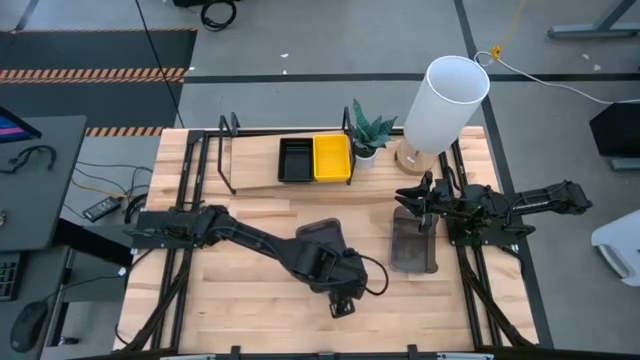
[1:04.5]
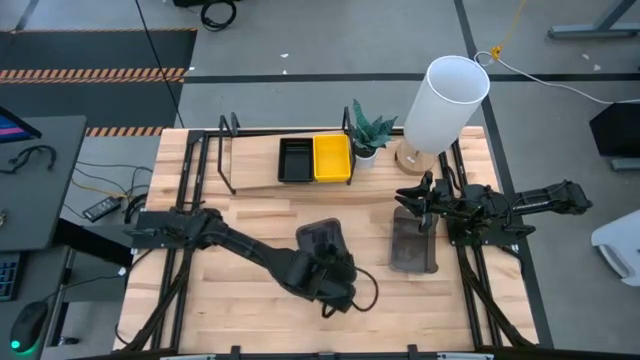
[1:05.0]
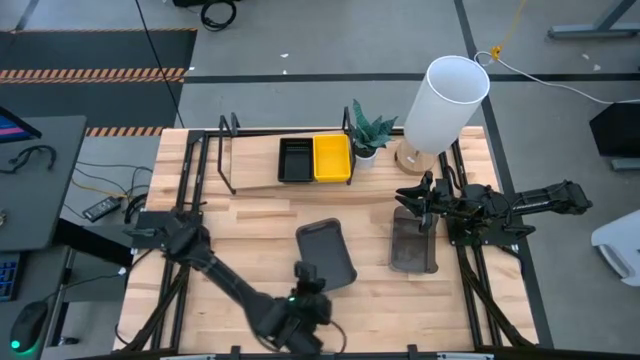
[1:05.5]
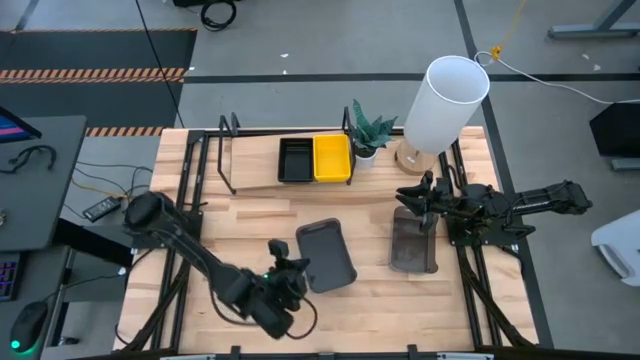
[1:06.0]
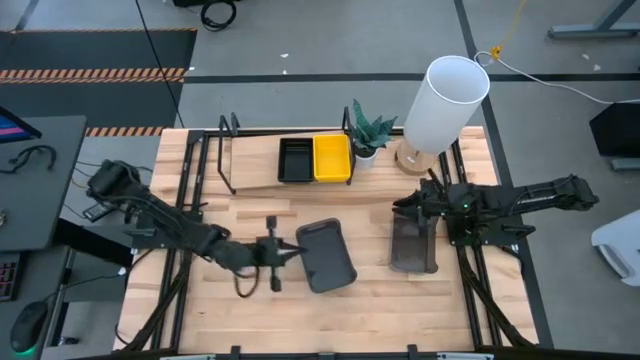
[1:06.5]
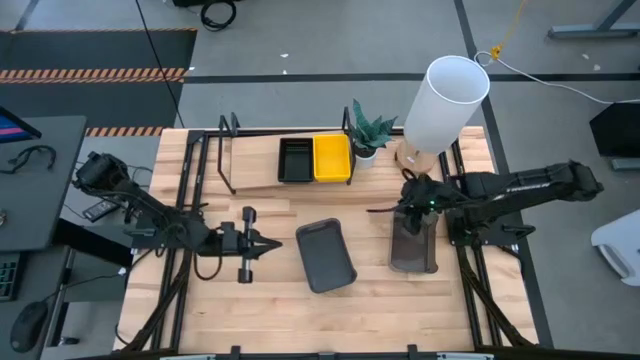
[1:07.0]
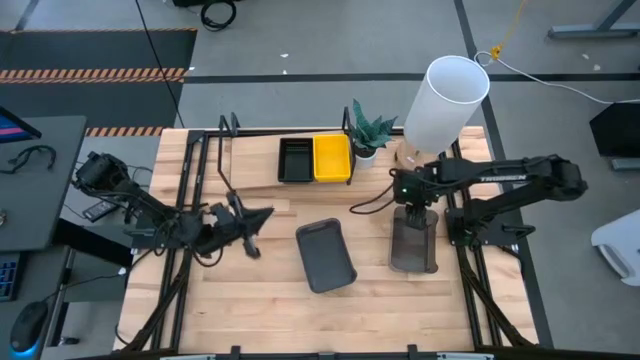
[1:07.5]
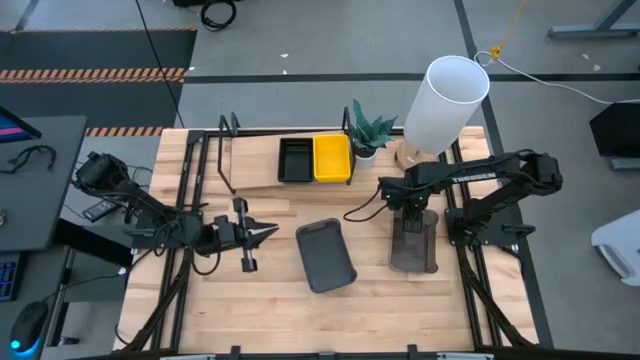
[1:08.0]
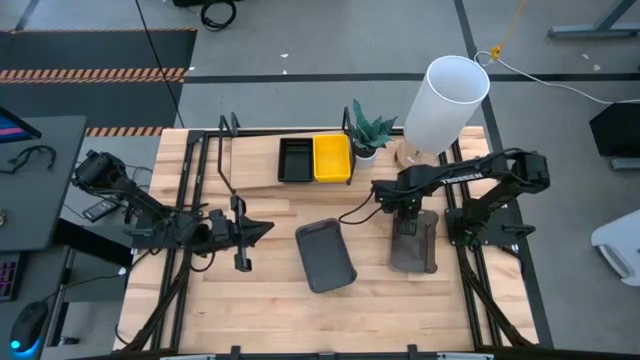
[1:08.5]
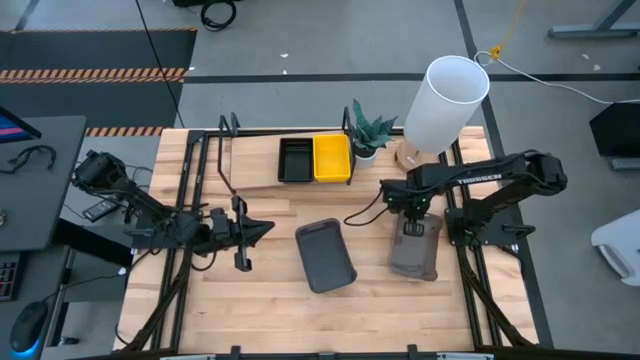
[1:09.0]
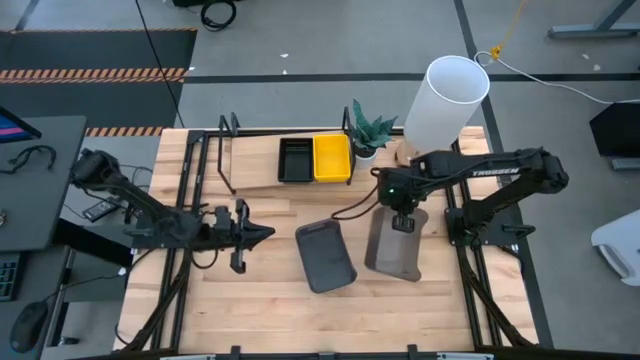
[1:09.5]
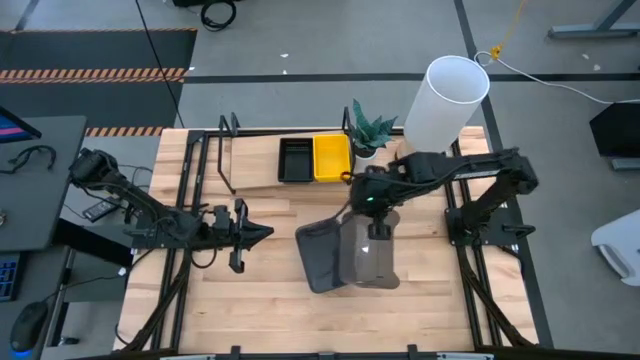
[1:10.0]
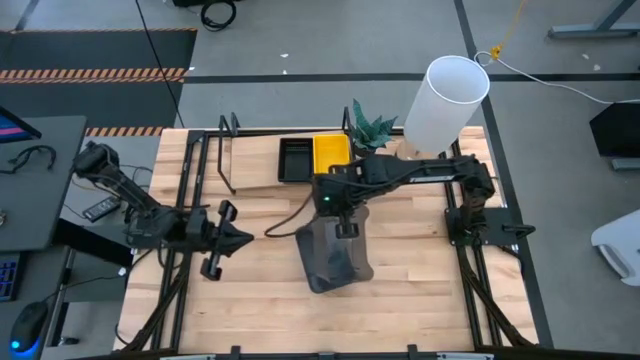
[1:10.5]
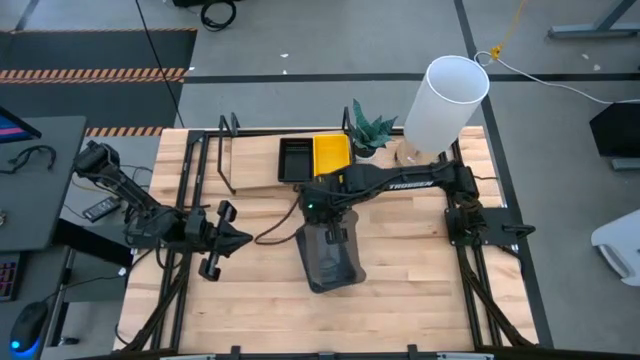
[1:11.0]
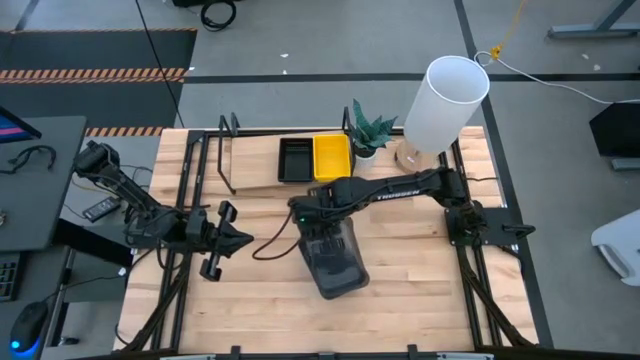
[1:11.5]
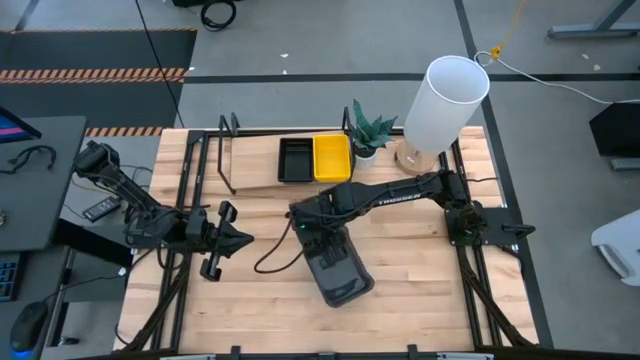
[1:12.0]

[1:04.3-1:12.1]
Task: Stack baskets on shelf by color
Stack the right black bin on top of the left black bin

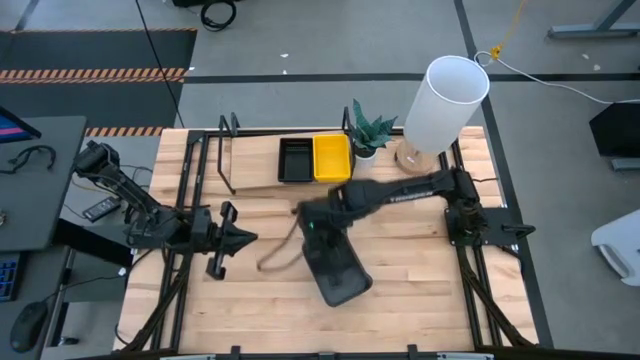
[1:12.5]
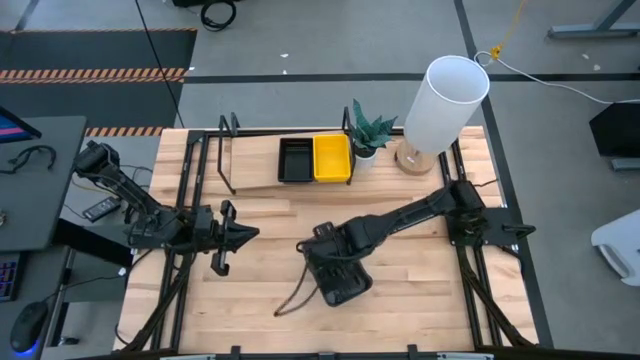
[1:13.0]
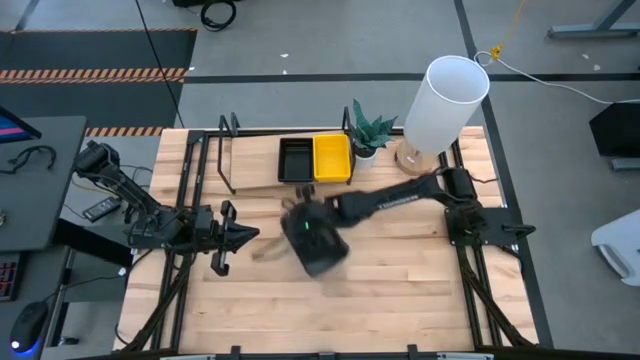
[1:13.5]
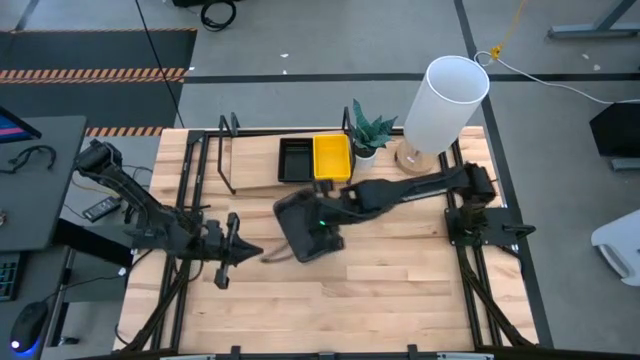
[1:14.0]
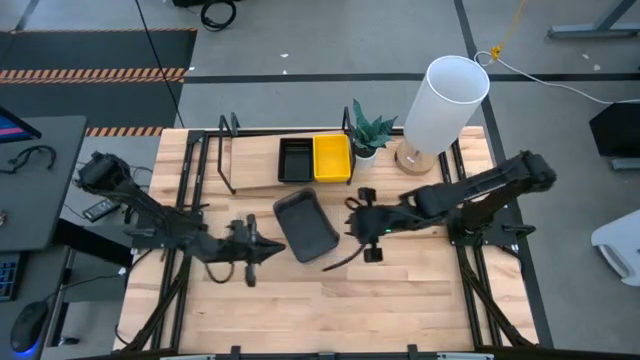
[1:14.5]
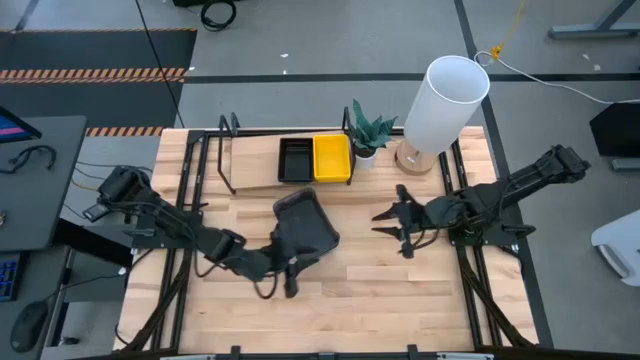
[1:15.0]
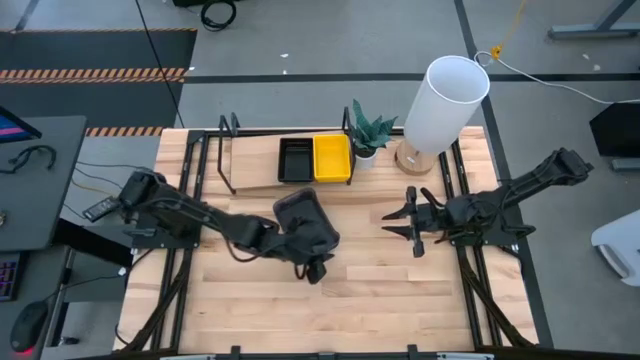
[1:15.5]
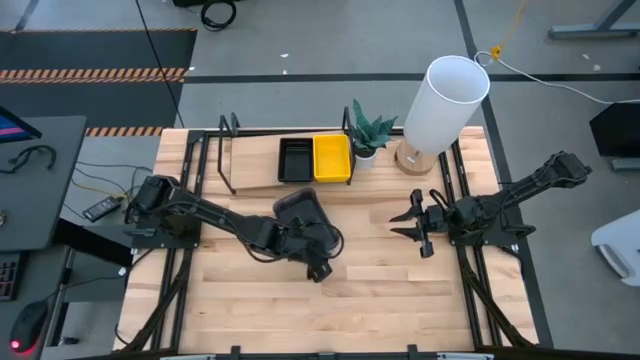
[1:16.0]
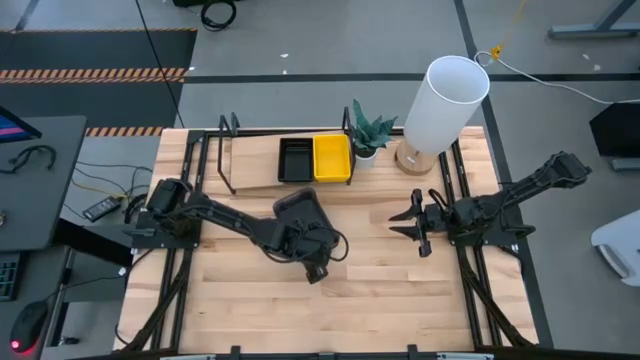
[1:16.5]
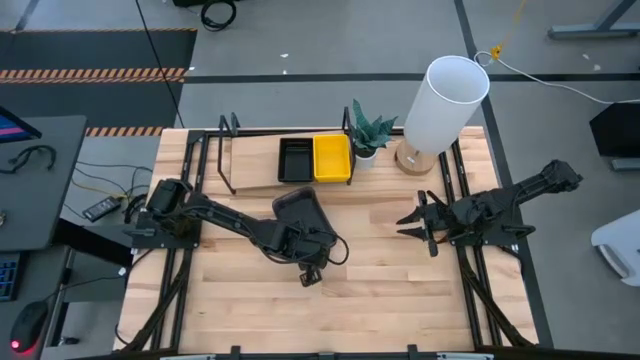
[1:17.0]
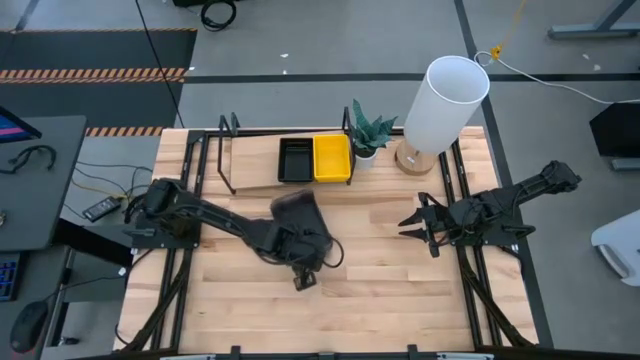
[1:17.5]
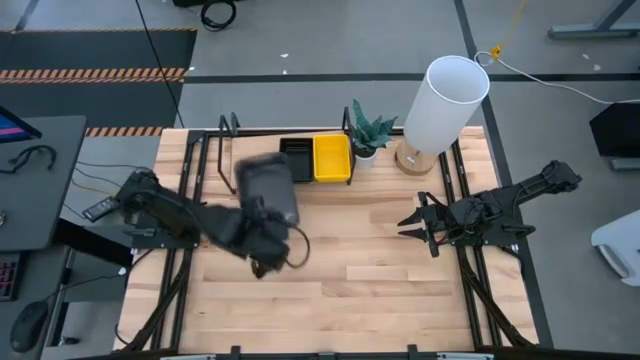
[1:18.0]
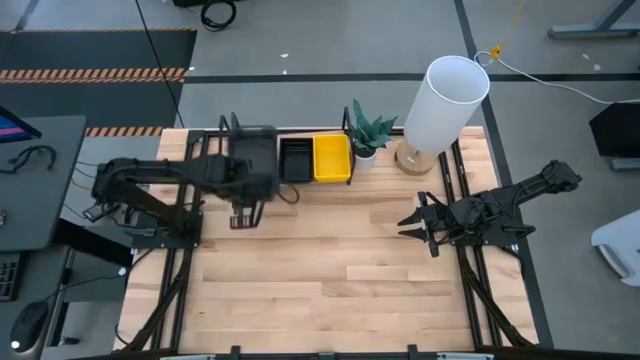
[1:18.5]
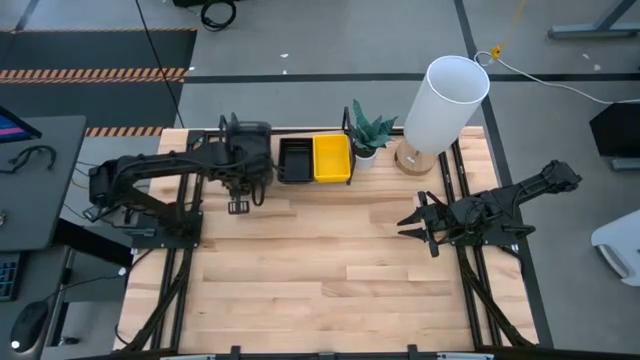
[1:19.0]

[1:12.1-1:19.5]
Put the stacked black bins on the shelf

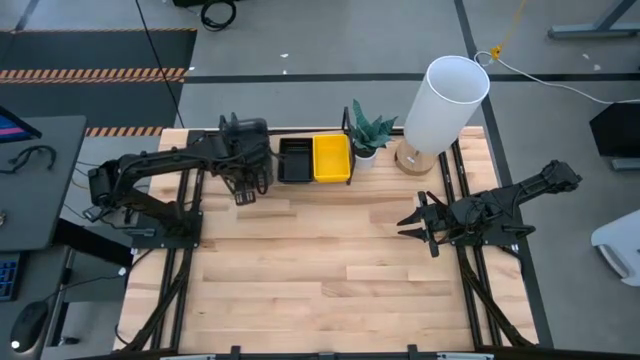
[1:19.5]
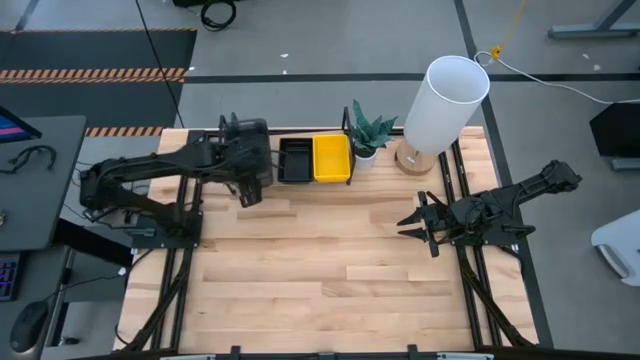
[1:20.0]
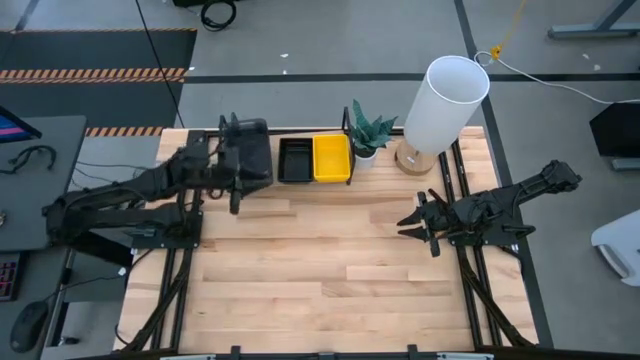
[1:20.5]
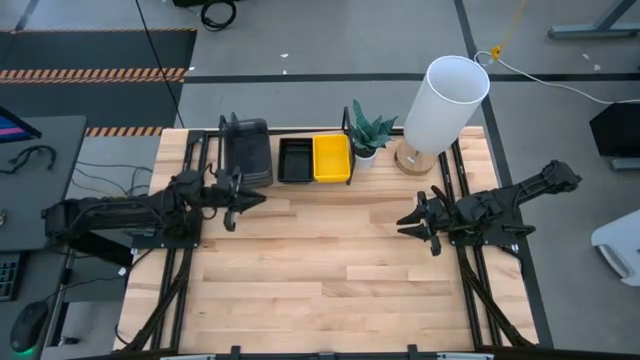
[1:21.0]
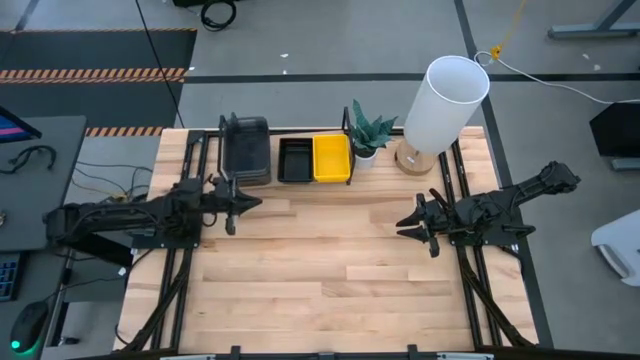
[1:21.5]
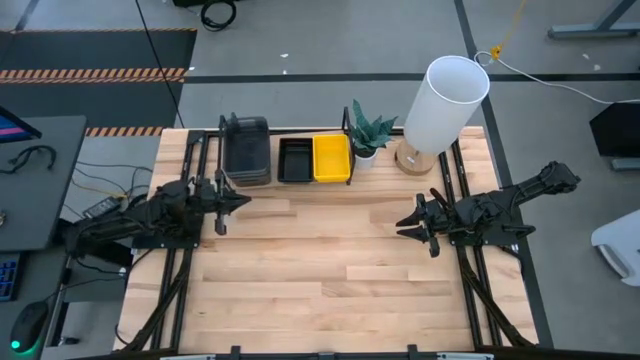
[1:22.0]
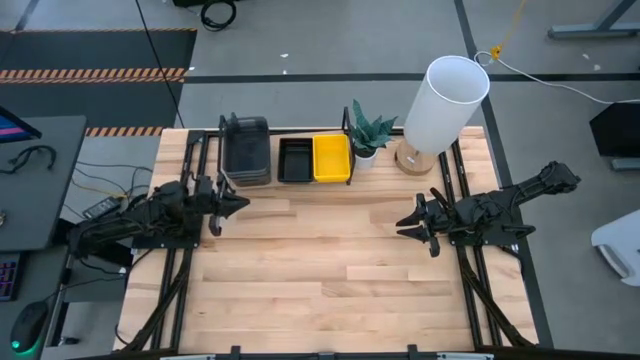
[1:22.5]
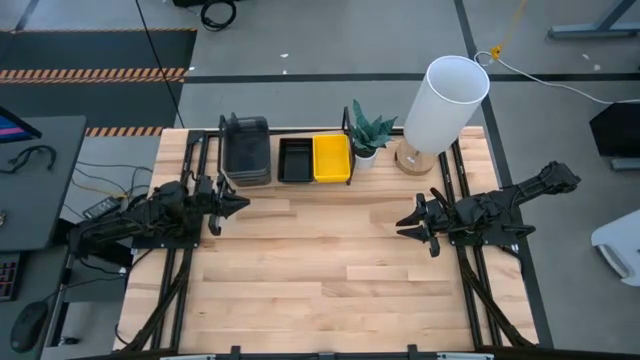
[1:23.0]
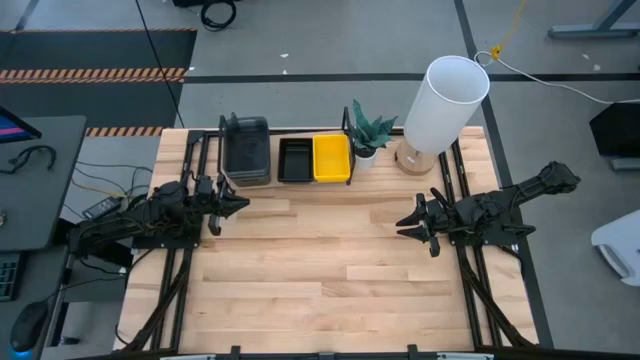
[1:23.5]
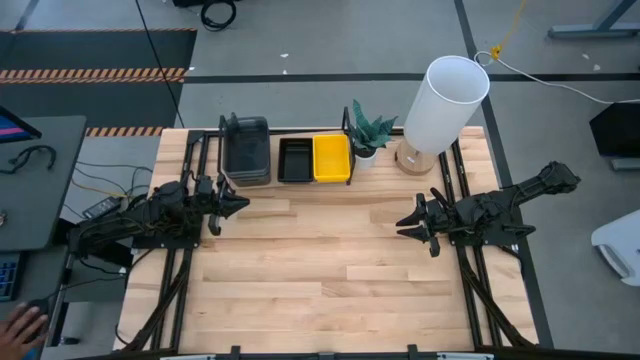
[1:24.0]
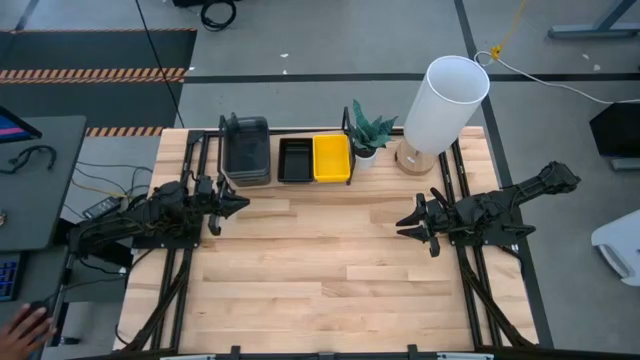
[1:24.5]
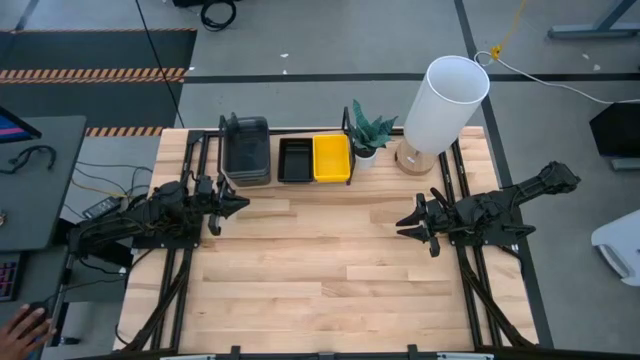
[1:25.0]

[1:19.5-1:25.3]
Return to Home Position
